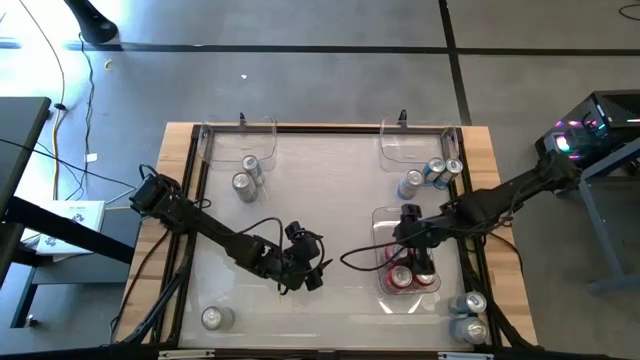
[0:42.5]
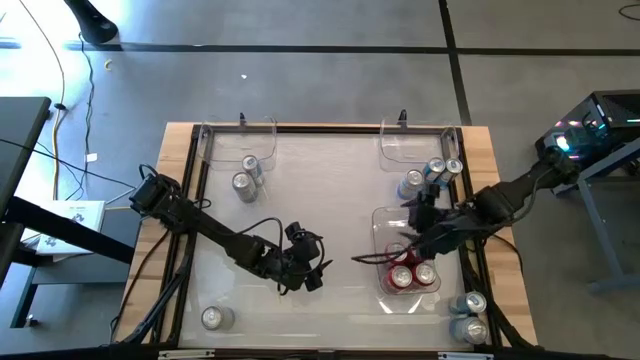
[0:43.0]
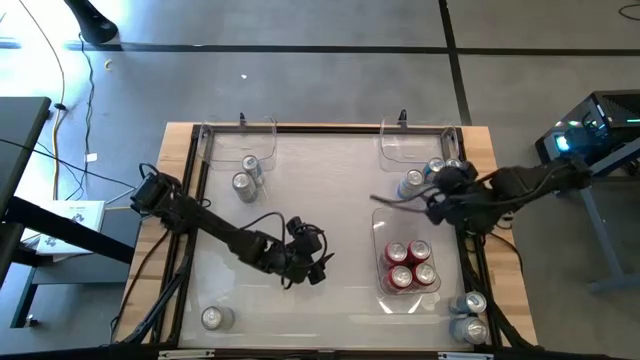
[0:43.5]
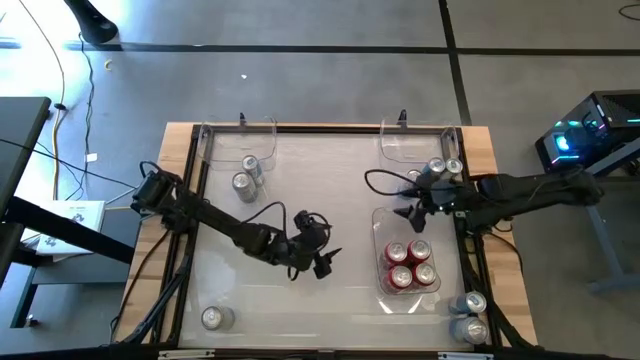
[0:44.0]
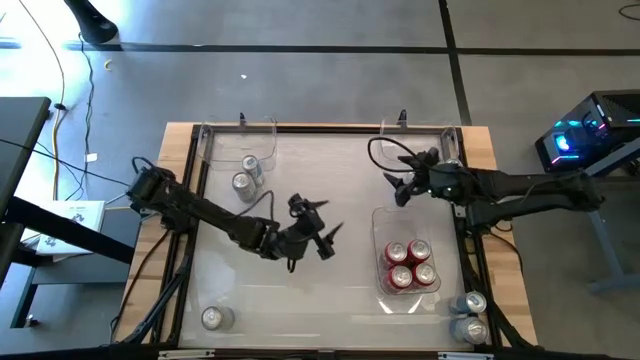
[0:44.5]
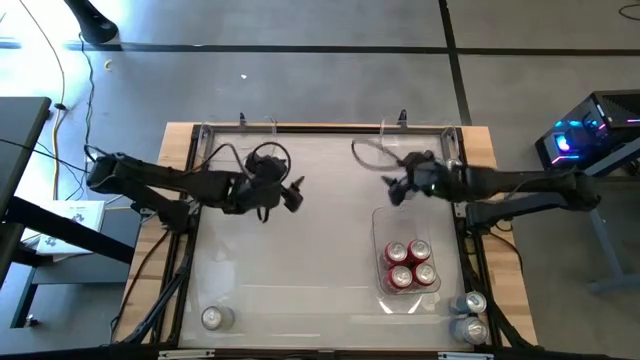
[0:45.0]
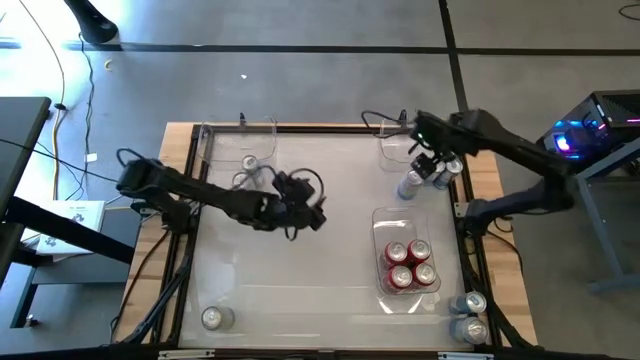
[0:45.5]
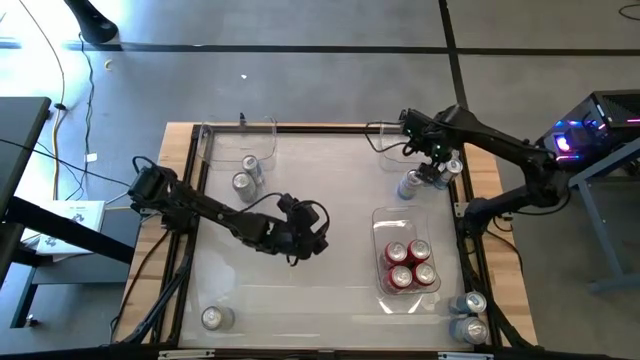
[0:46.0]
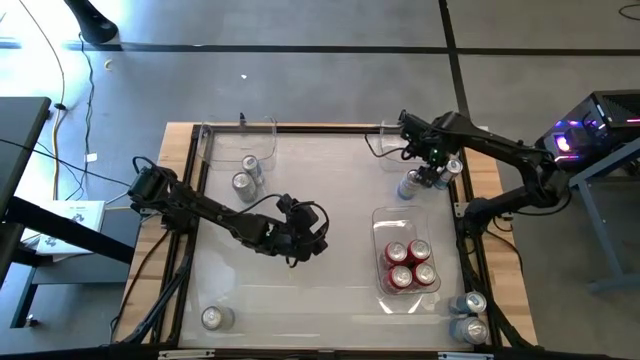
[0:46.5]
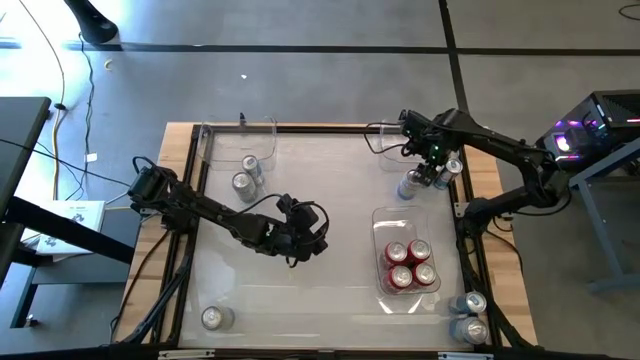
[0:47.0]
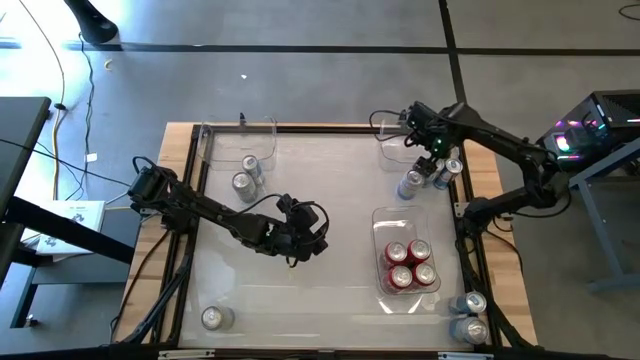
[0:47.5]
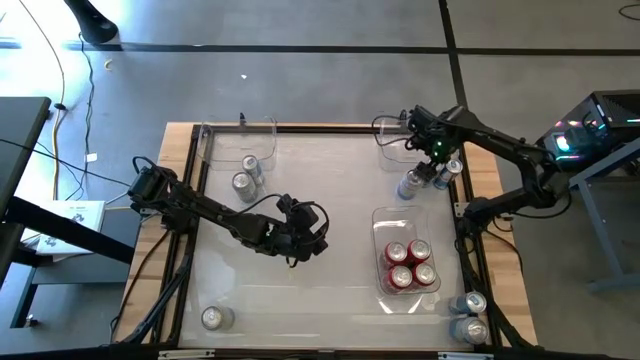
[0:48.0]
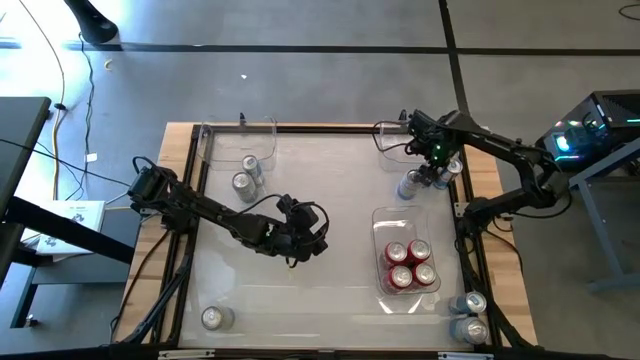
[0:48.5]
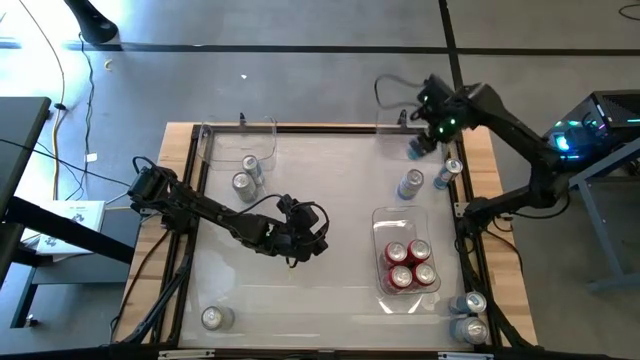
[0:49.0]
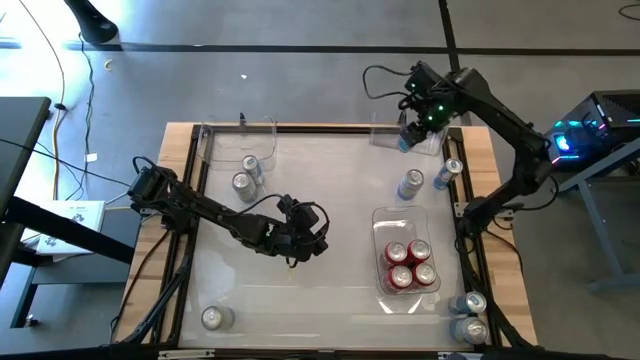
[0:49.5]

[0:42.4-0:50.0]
Task: Sort soda cans
Put the top right blue soda can into the top right transparent bin

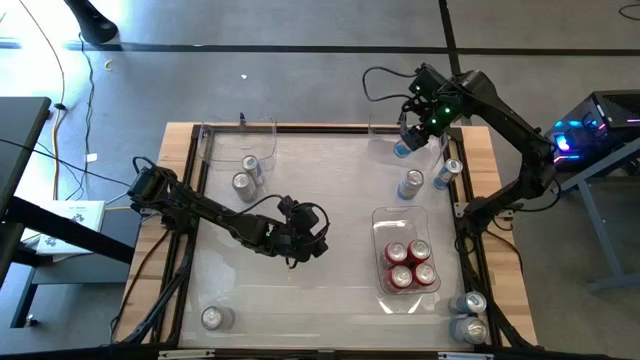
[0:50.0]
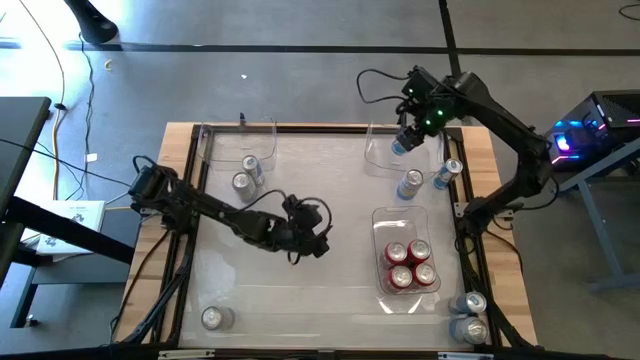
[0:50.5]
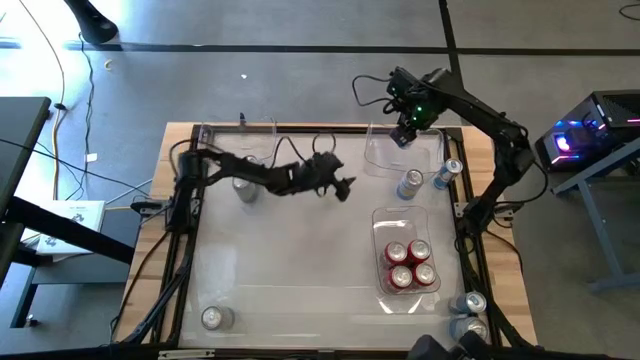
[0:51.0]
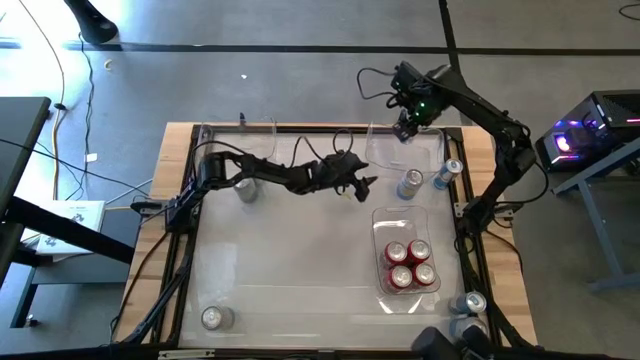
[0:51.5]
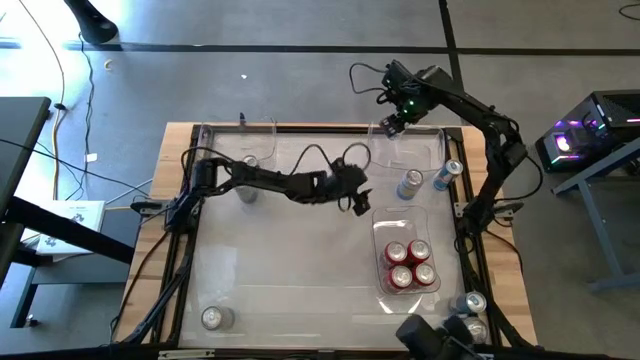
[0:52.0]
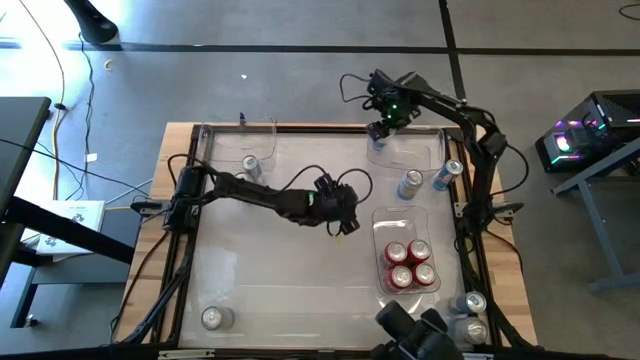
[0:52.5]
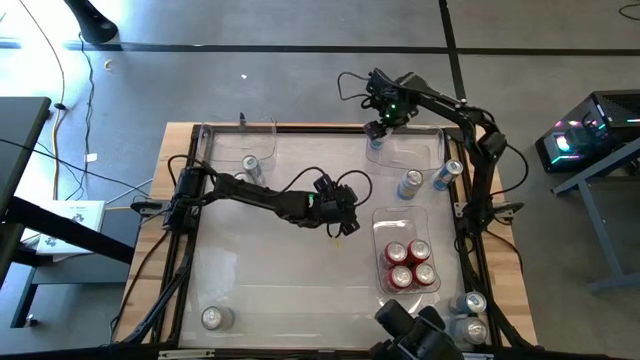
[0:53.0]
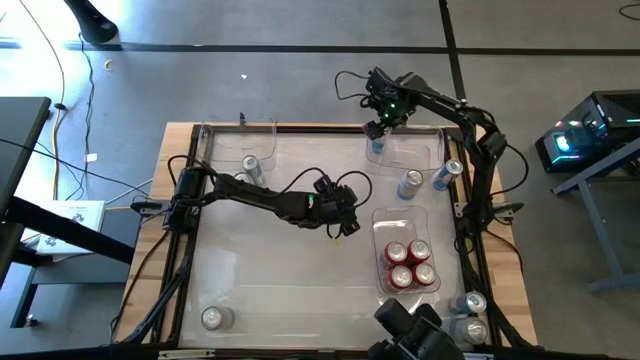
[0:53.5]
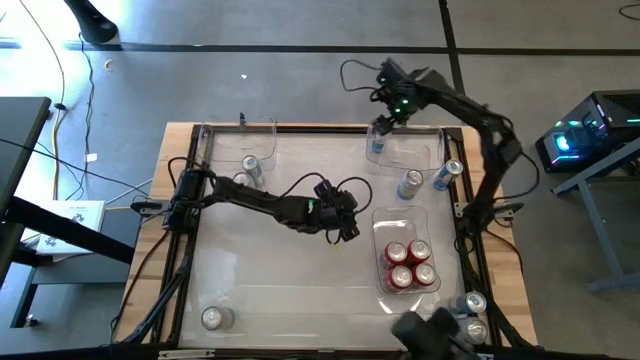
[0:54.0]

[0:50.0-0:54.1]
Put the top right blue soda can into the top right transparent bin

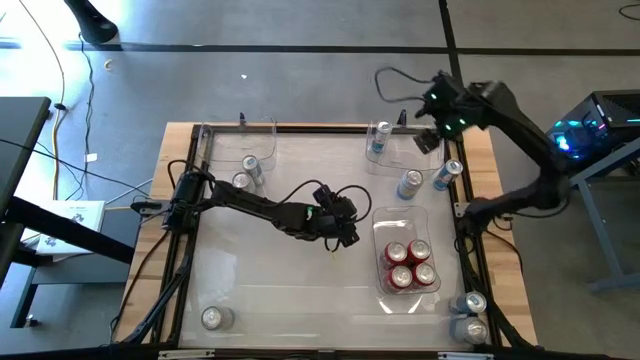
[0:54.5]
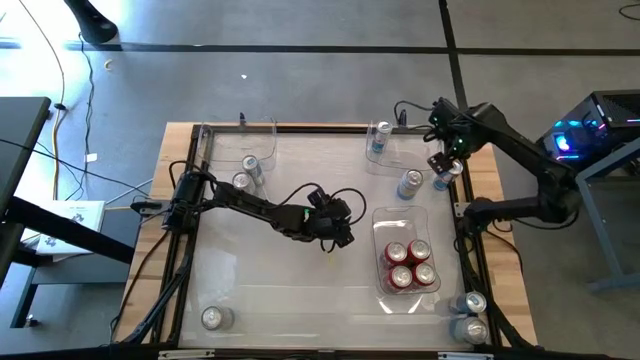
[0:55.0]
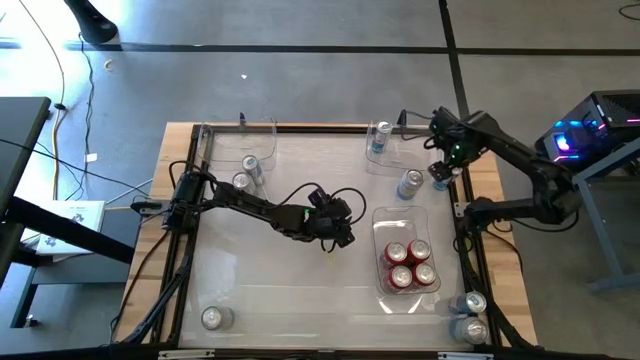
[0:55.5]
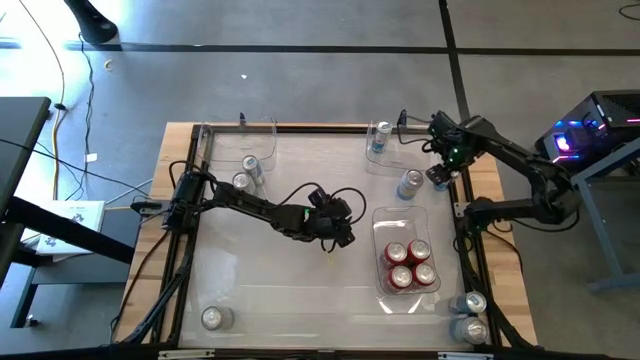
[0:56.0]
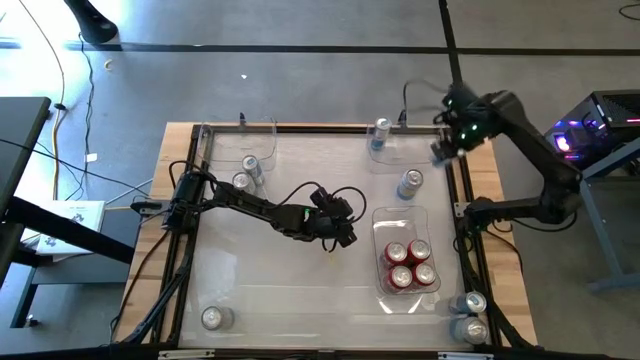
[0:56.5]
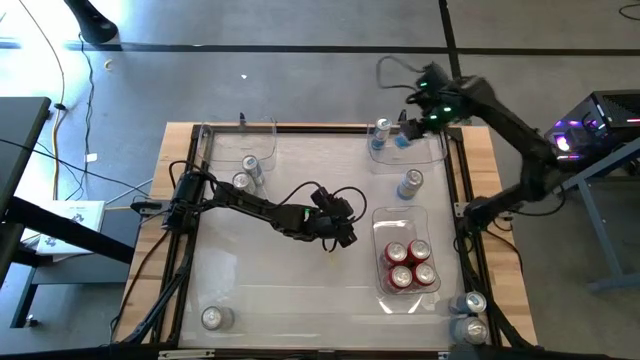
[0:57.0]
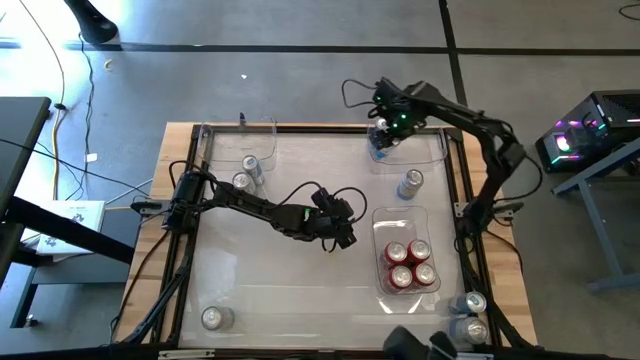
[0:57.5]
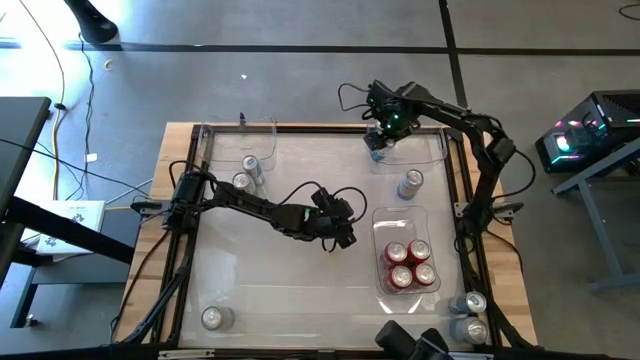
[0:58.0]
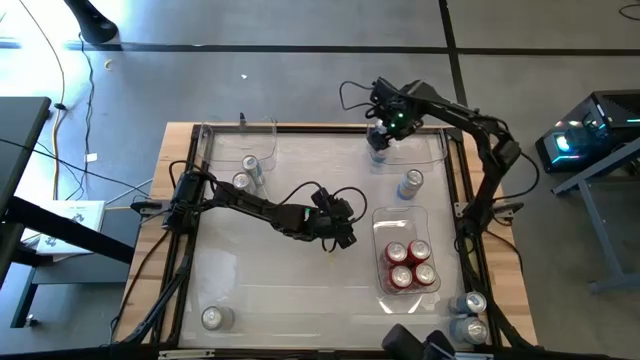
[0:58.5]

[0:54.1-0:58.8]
Put the top blue soda can into the top right transparent bin

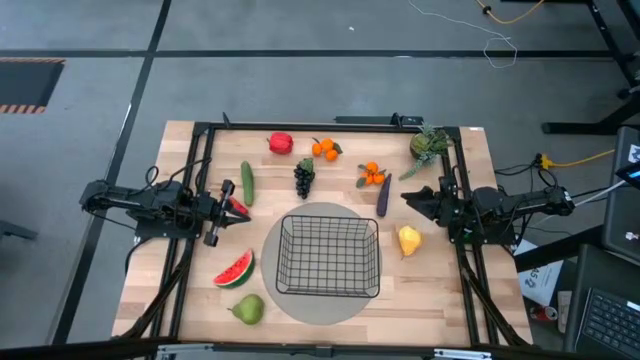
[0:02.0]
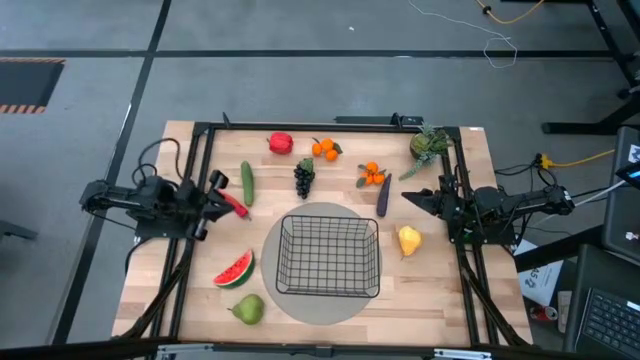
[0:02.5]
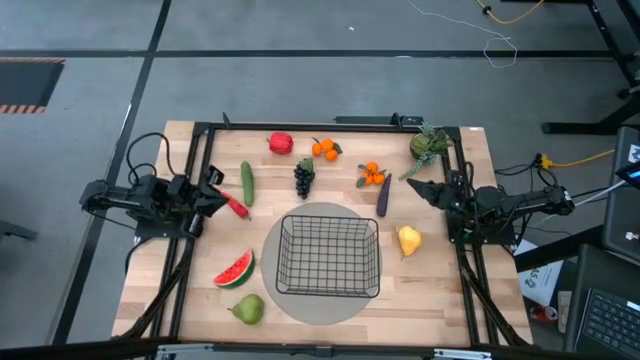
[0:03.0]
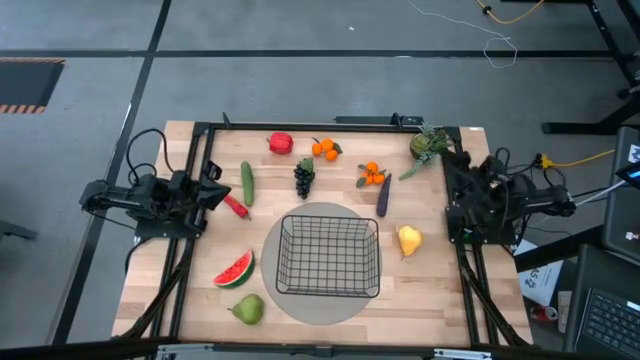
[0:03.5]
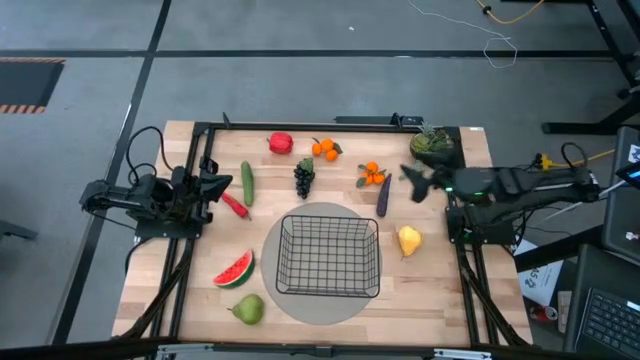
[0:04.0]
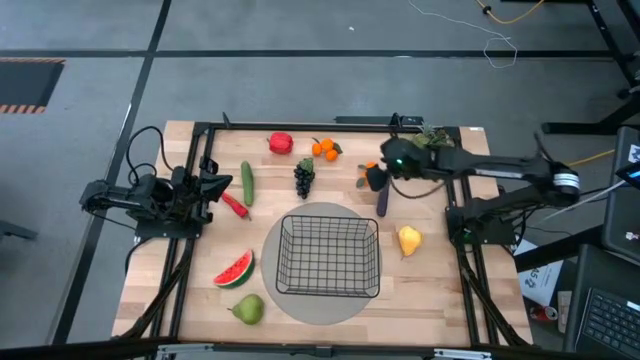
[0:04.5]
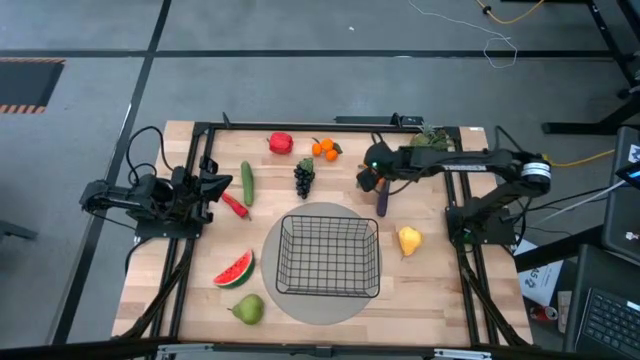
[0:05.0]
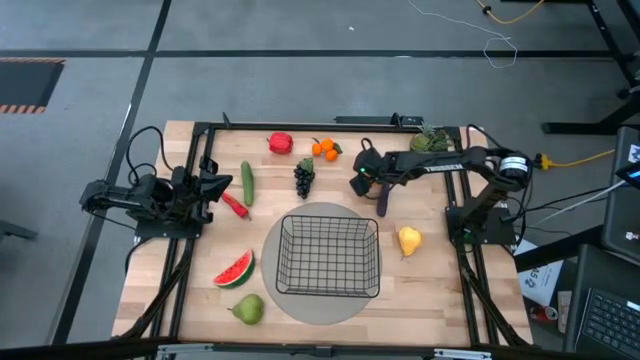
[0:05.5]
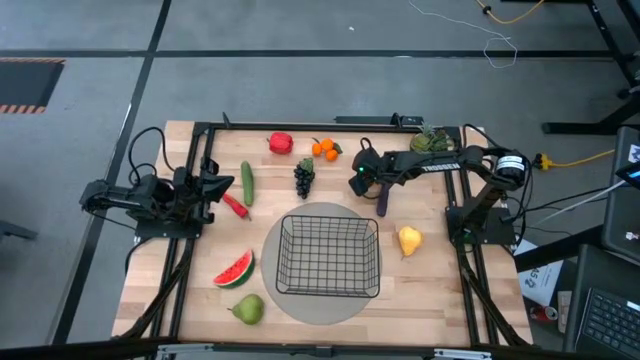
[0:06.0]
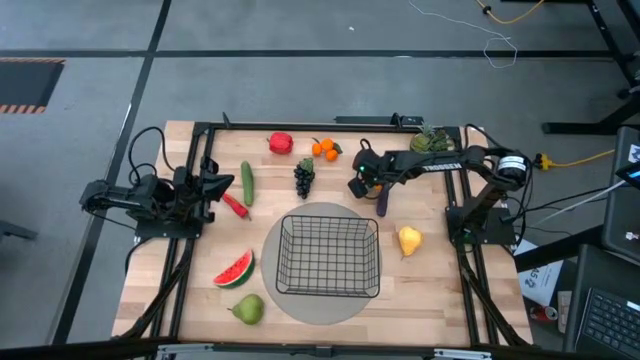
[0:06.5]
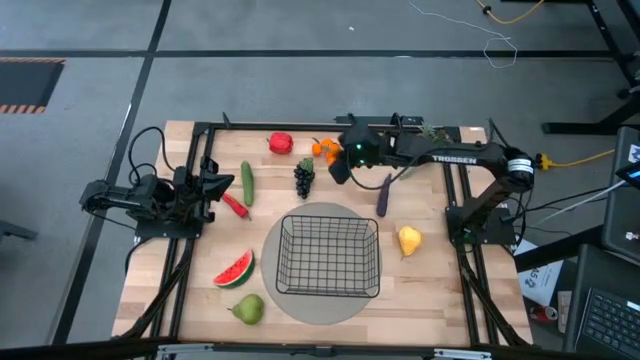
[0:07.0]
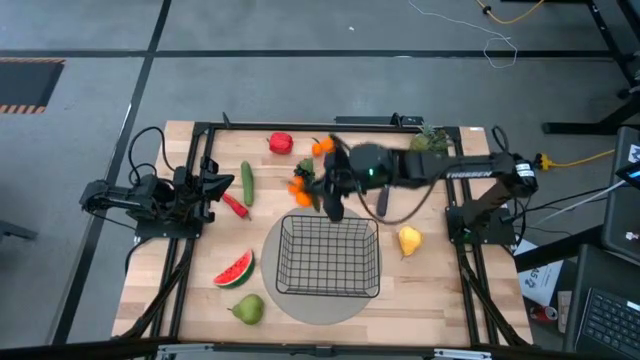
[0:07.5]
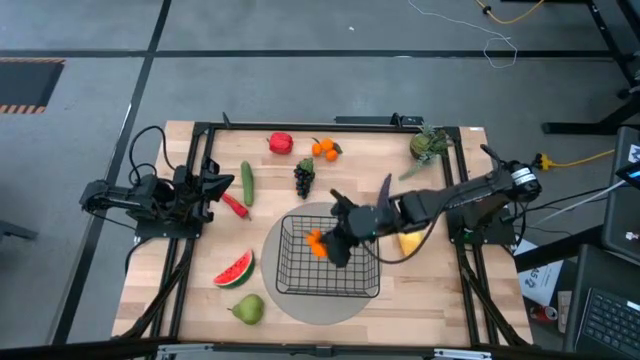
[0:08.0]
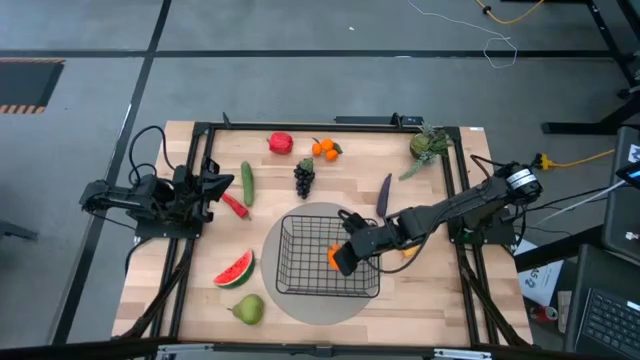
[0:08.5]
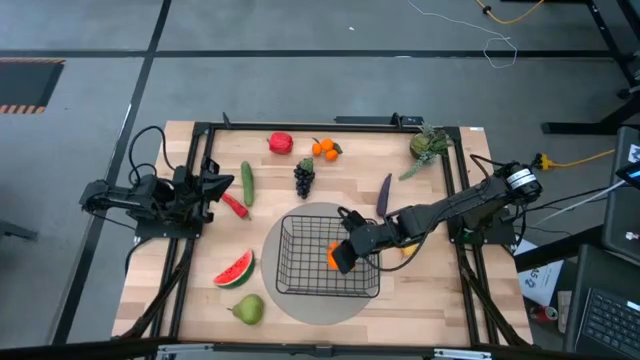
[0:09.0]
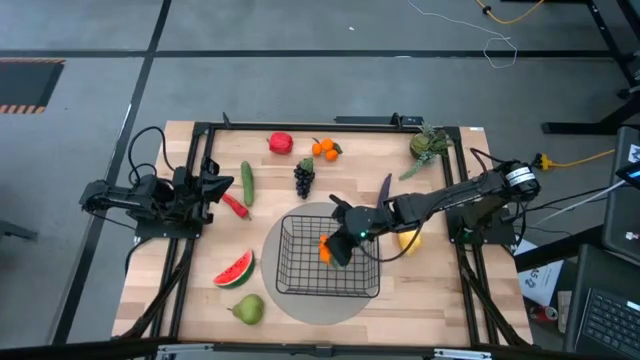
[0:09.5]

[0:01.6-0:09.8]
Task: Build produce basket
Put the bottom orange tangerines into the black wire basket
